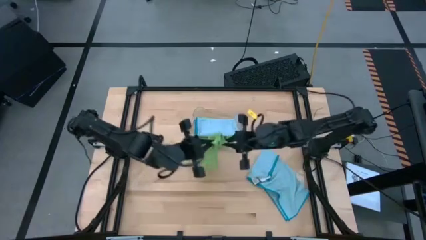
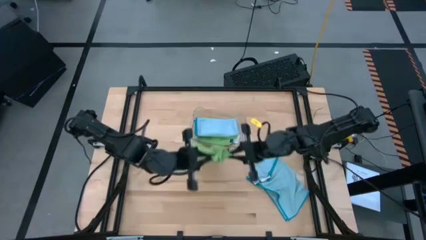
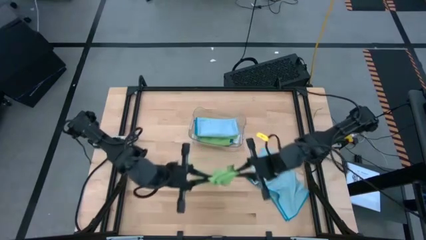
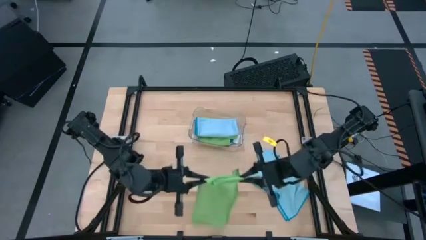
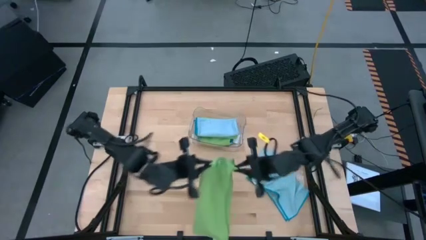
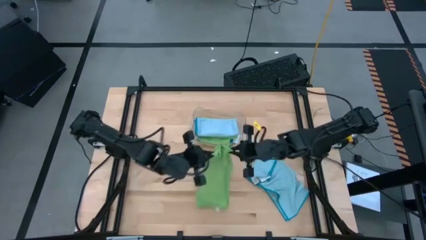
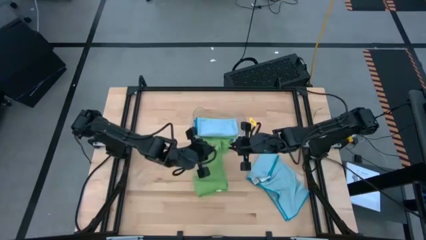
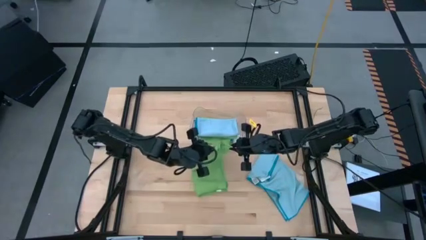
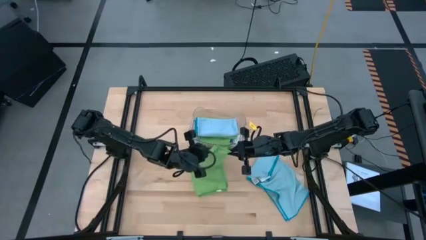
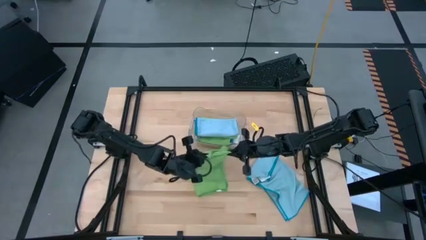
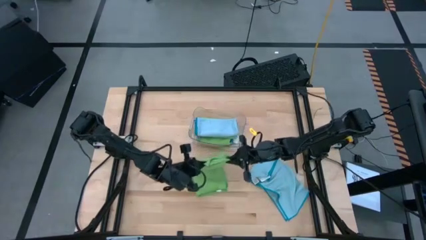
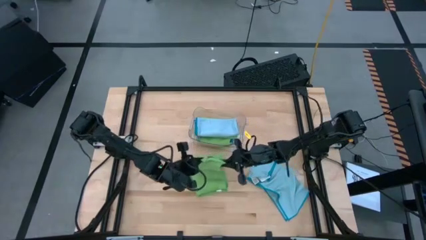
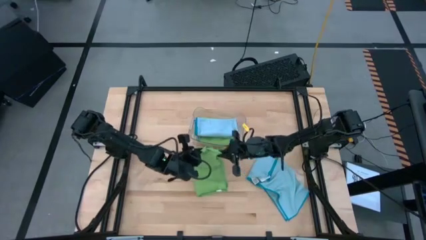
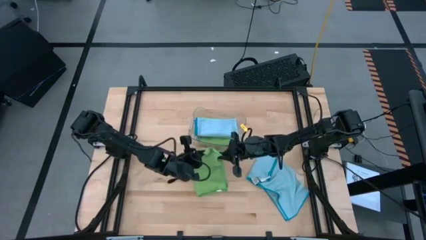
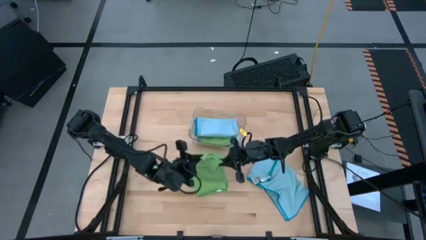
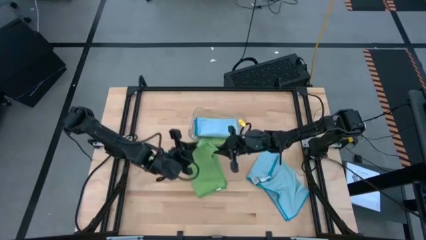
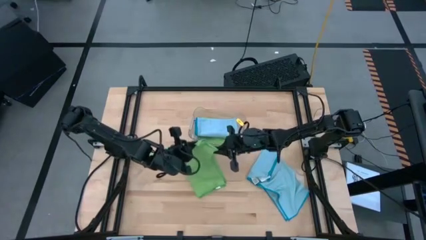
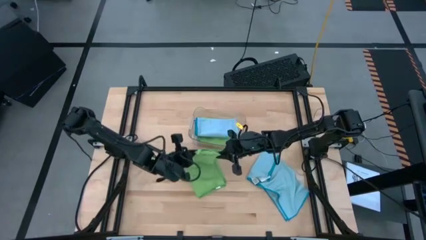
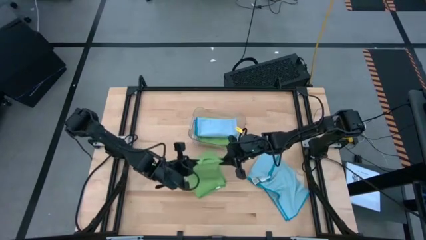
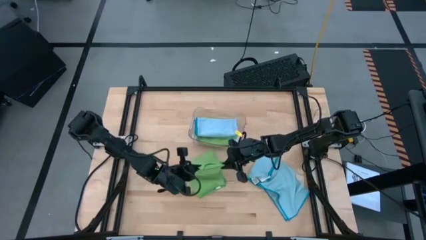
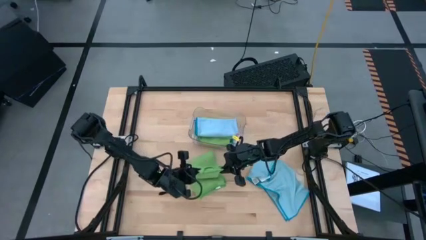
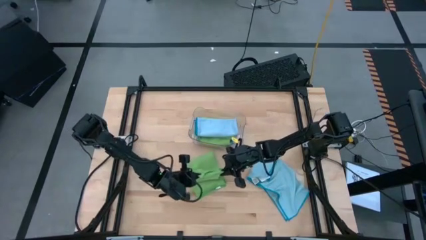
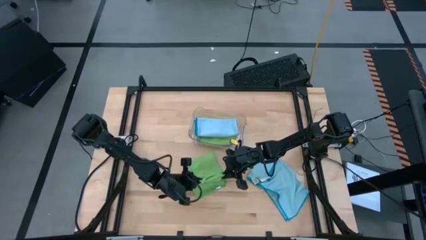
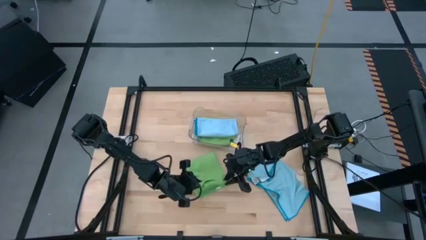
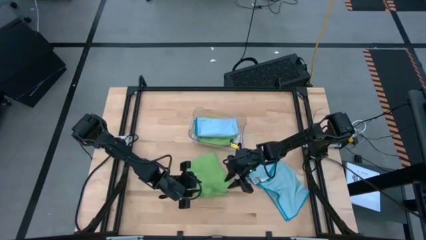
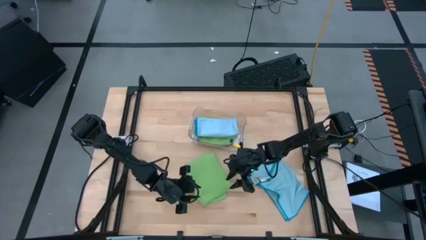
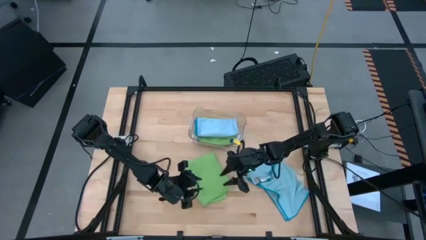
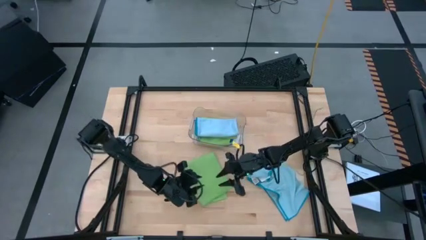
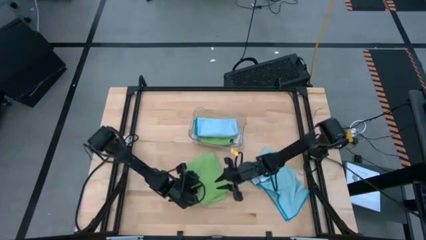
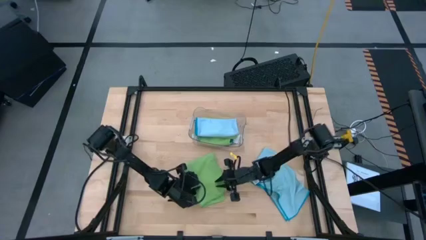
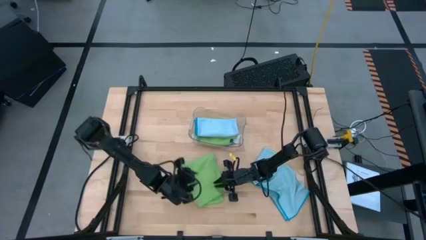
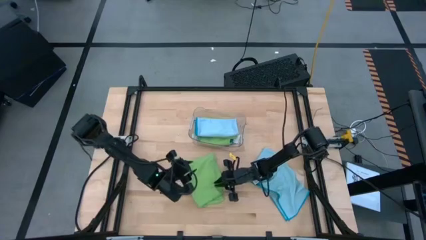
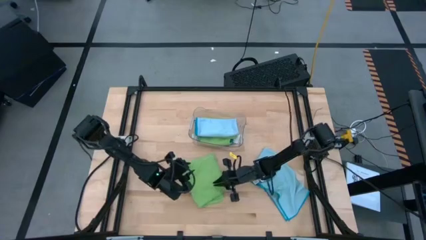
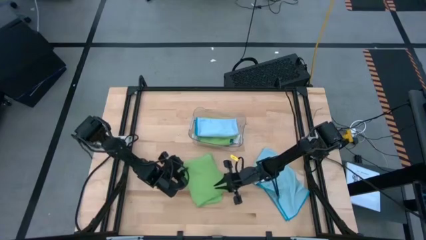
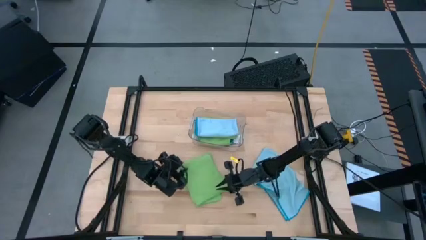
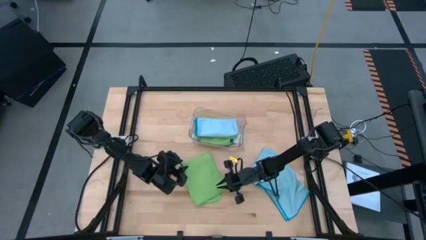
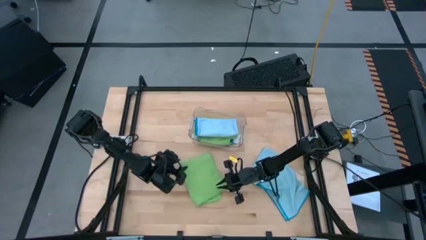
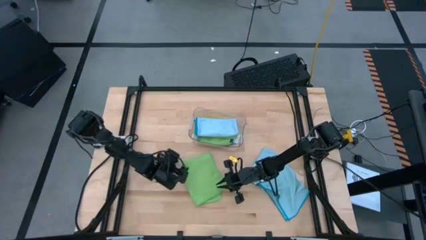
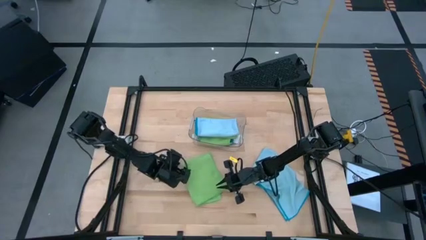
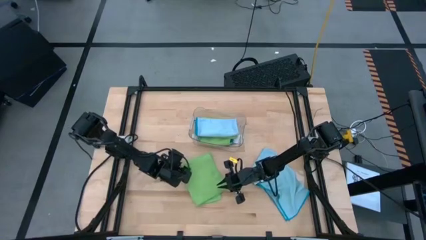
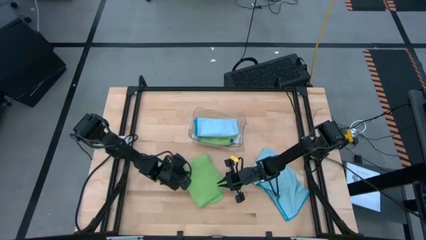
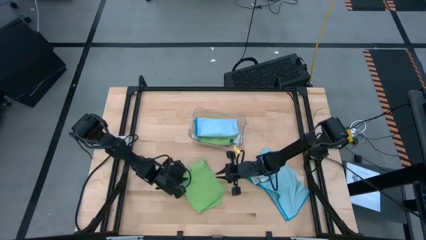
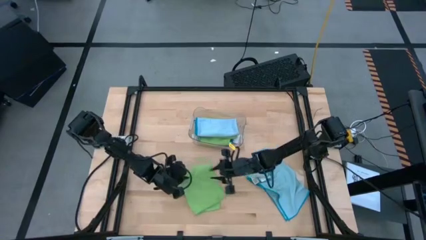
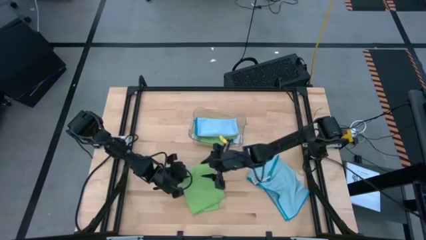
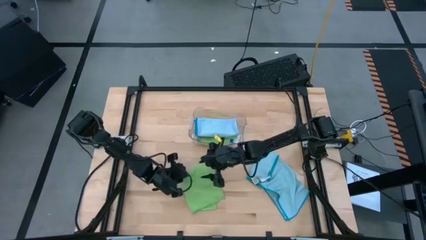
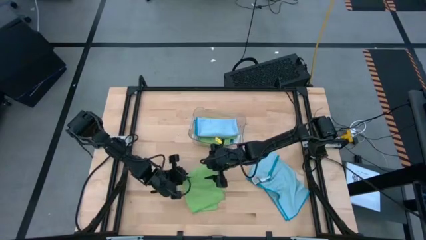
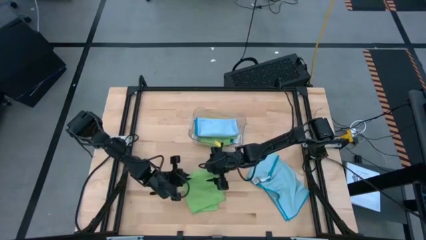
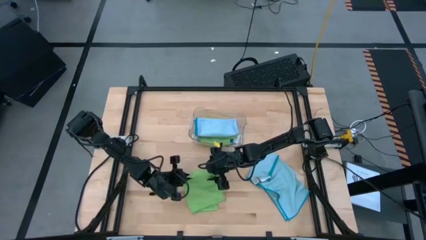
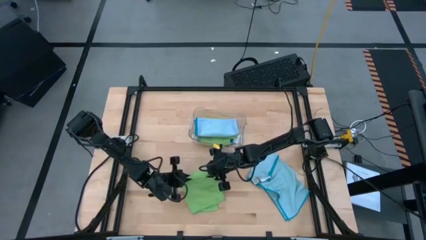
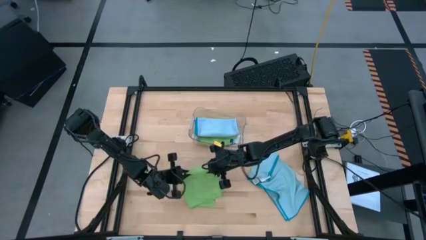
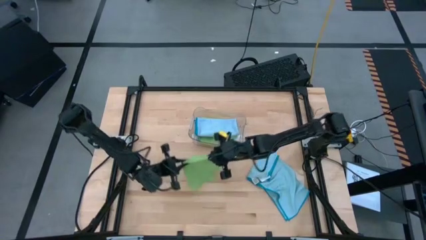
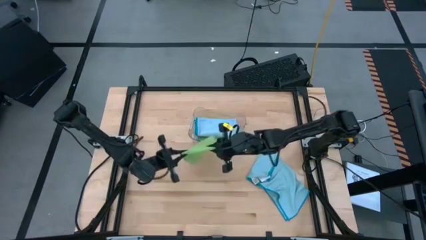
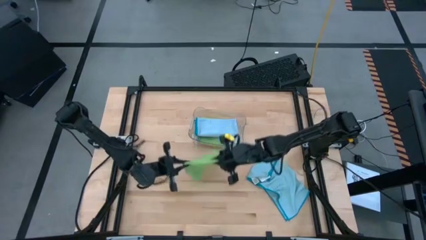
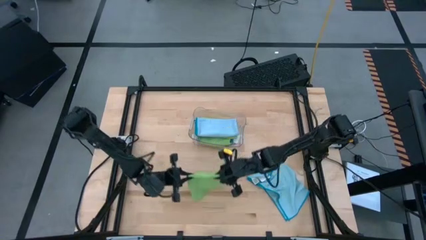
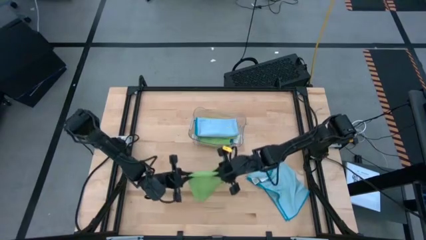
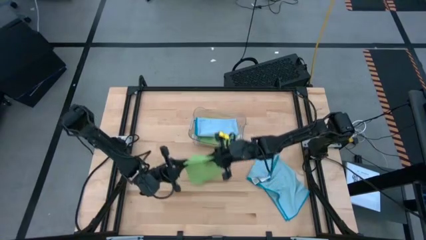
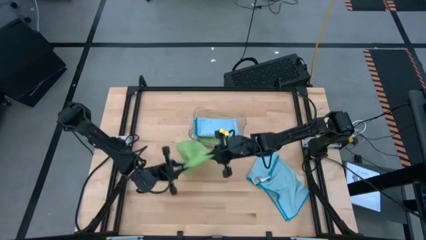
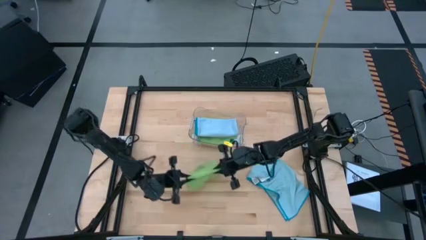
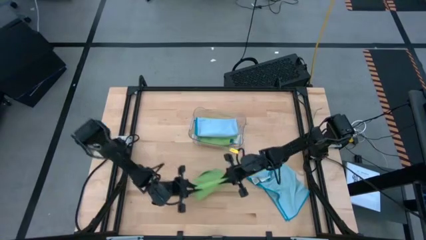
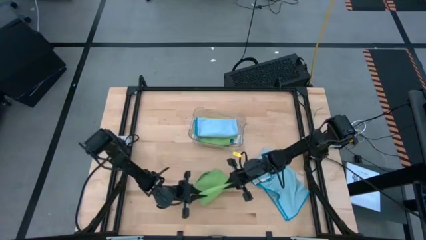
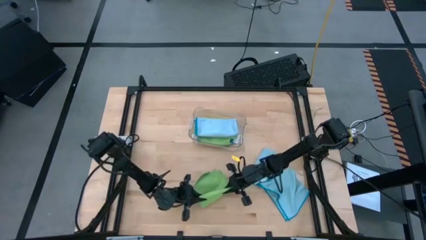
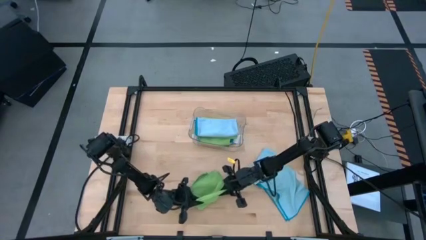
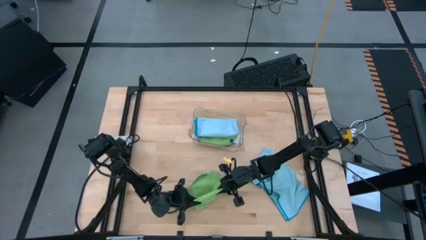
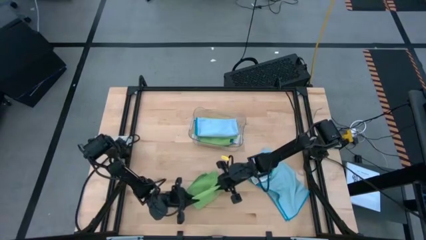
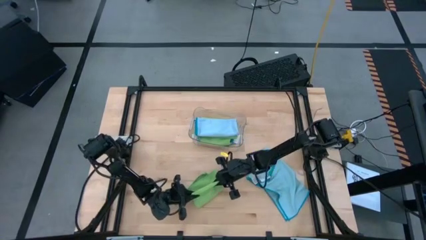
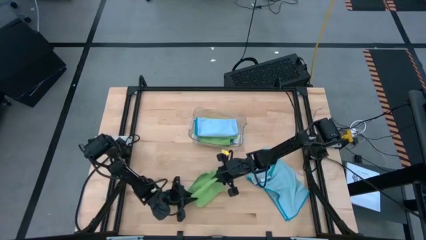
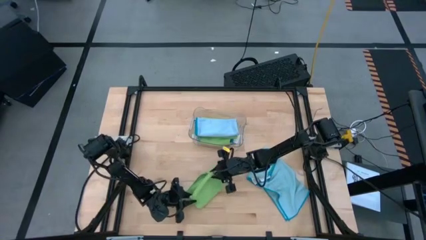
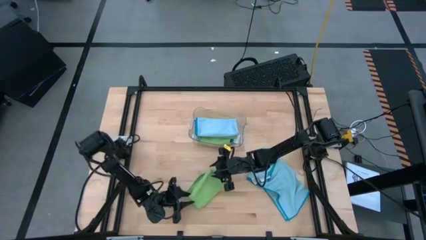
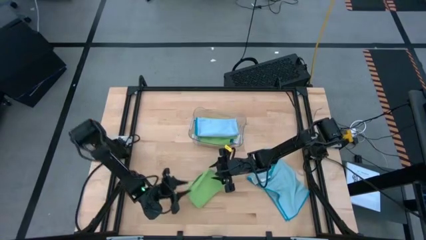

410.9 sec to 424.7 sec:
Task: Fold microfiber towels
Fold the green microfiber cloth
